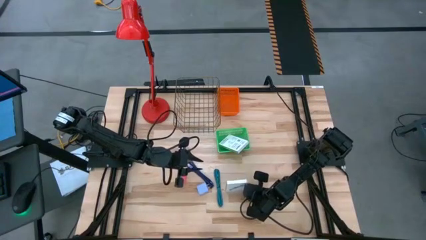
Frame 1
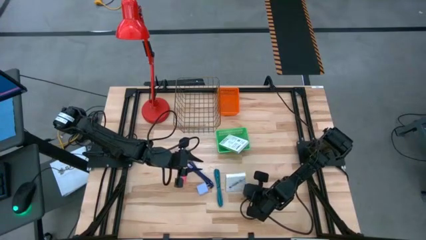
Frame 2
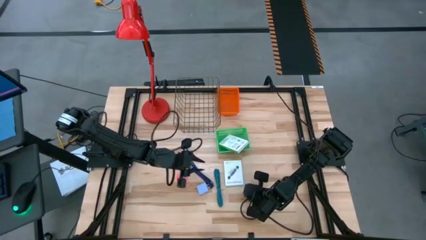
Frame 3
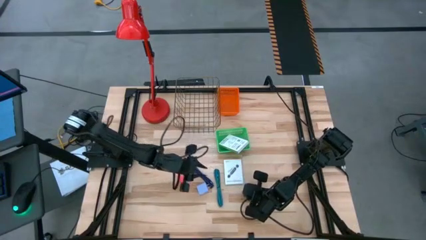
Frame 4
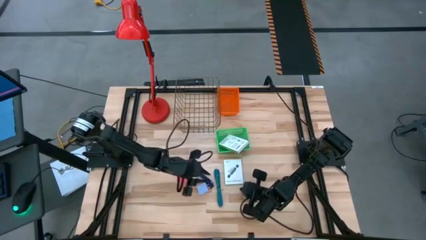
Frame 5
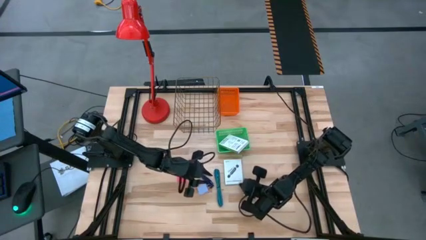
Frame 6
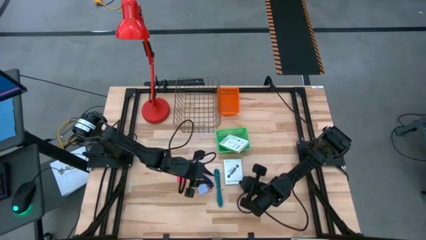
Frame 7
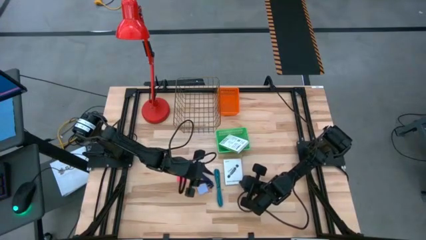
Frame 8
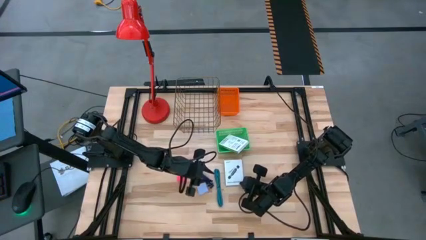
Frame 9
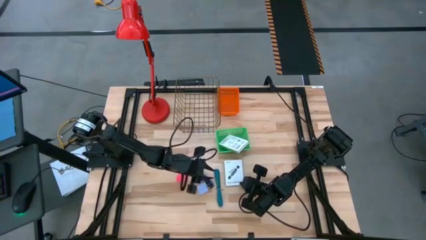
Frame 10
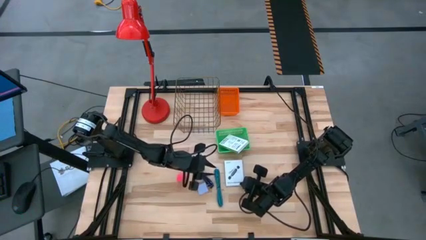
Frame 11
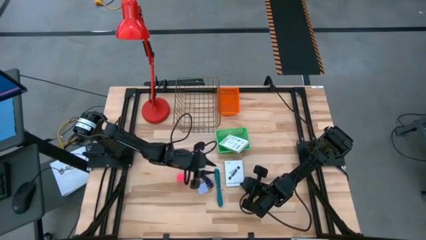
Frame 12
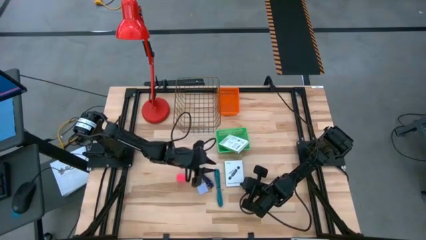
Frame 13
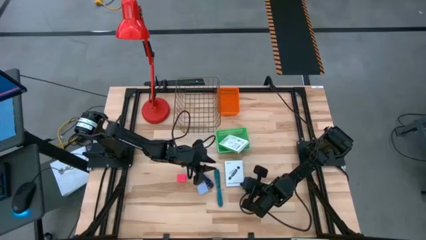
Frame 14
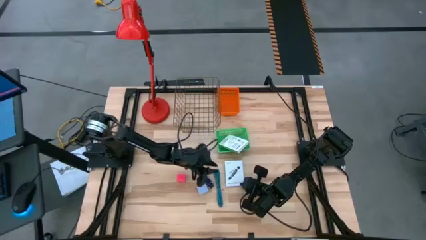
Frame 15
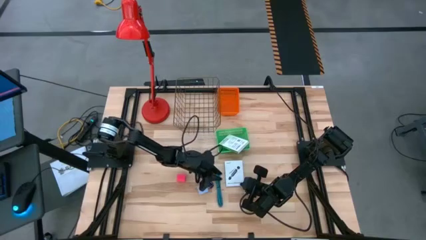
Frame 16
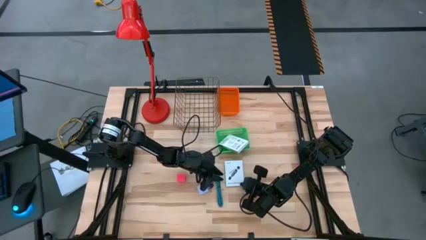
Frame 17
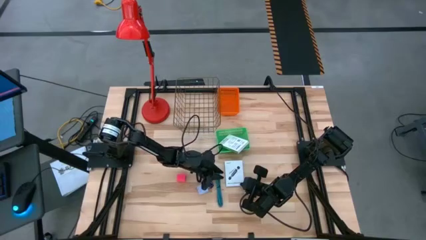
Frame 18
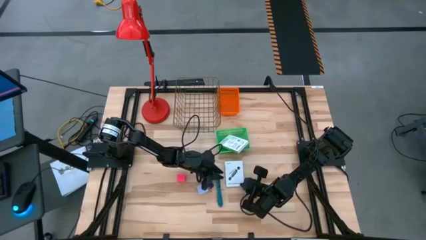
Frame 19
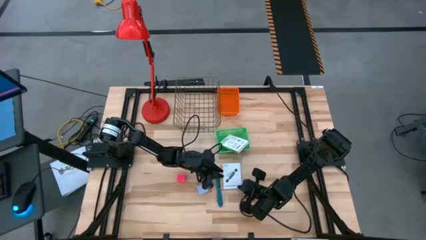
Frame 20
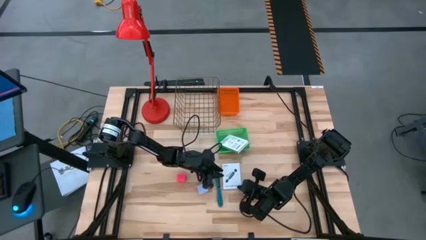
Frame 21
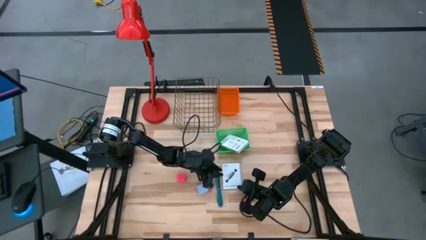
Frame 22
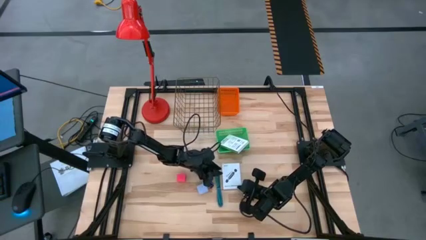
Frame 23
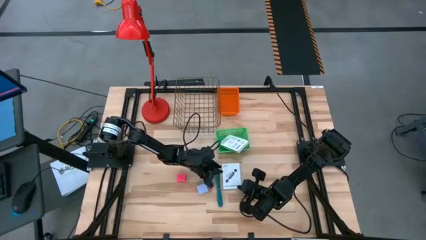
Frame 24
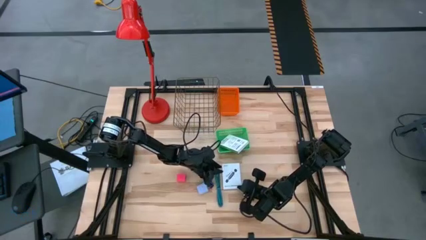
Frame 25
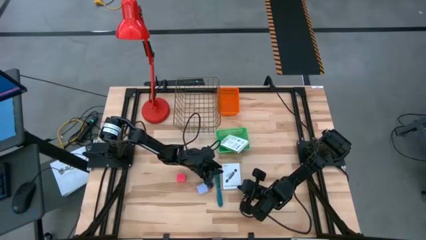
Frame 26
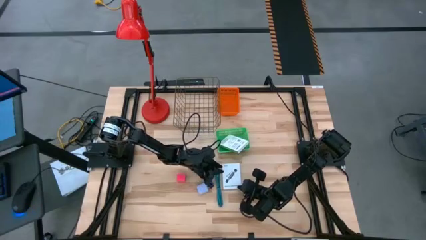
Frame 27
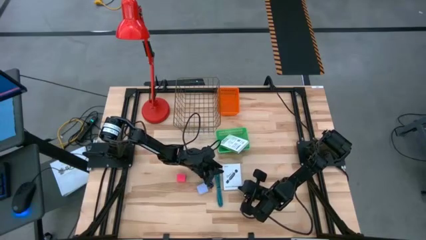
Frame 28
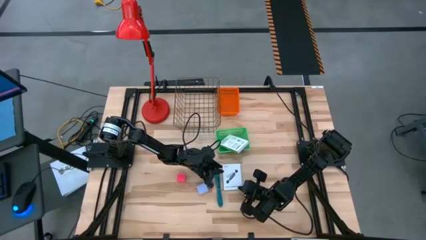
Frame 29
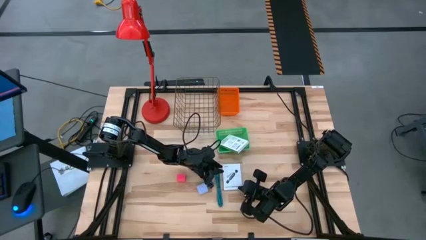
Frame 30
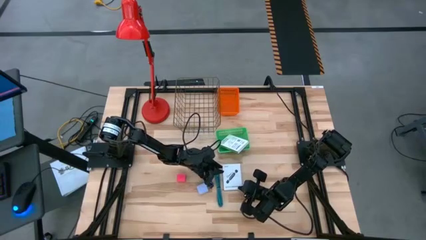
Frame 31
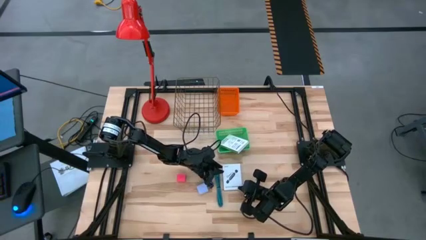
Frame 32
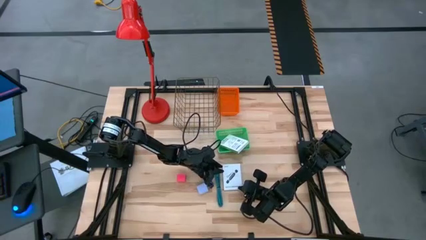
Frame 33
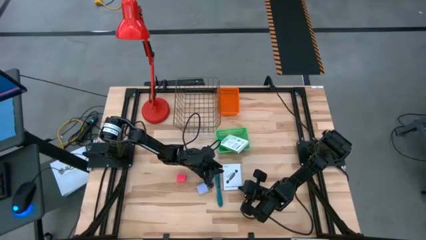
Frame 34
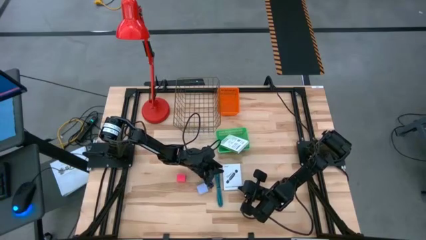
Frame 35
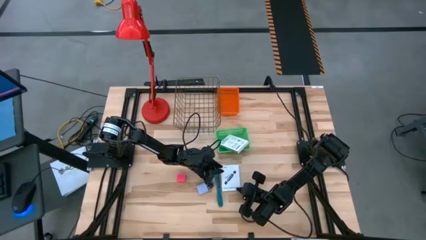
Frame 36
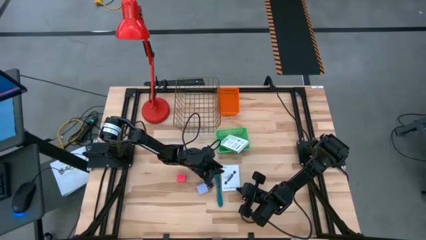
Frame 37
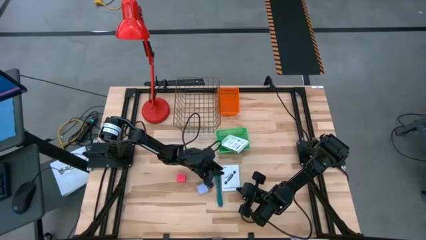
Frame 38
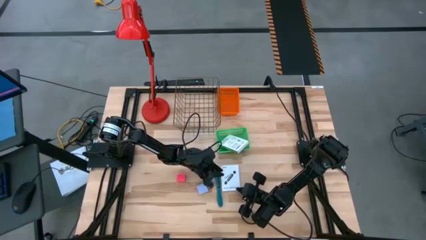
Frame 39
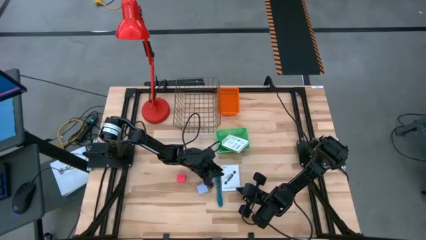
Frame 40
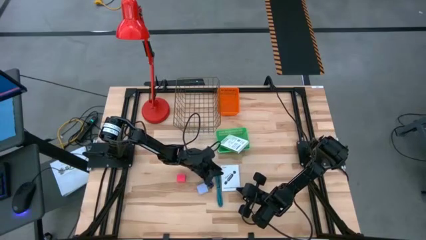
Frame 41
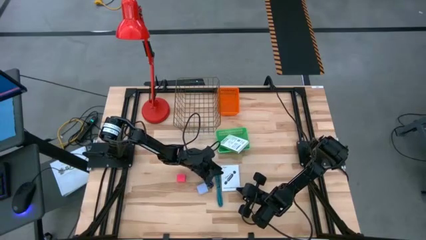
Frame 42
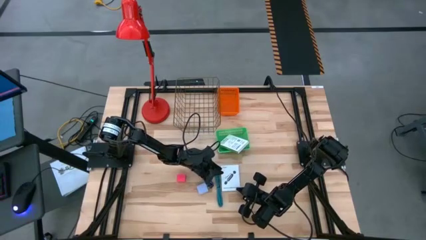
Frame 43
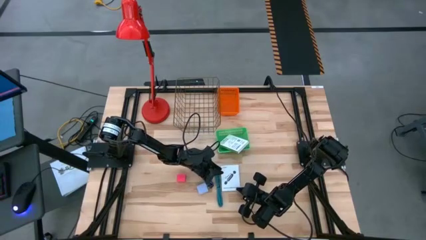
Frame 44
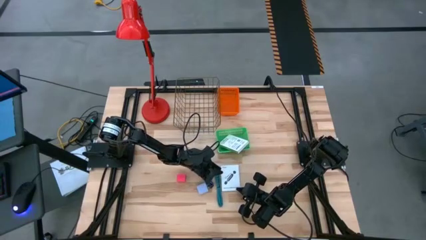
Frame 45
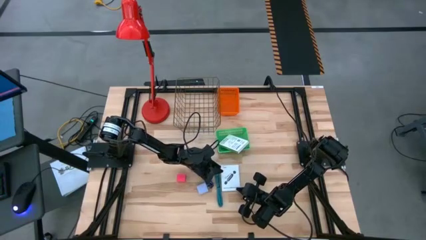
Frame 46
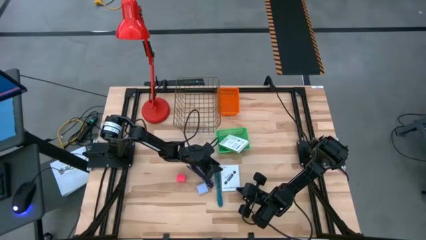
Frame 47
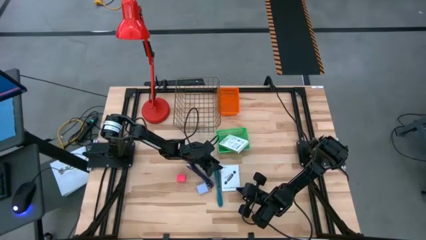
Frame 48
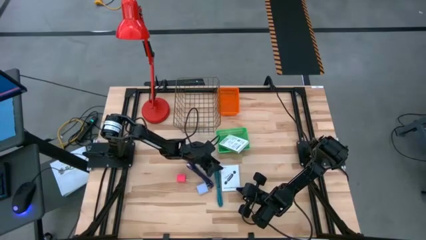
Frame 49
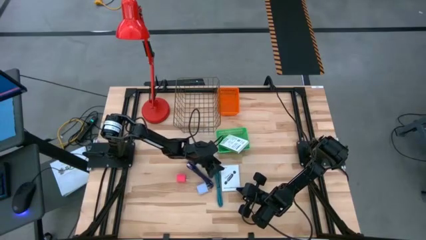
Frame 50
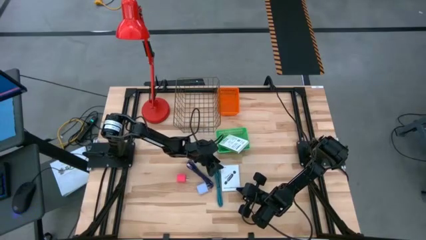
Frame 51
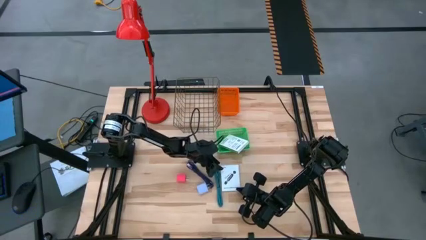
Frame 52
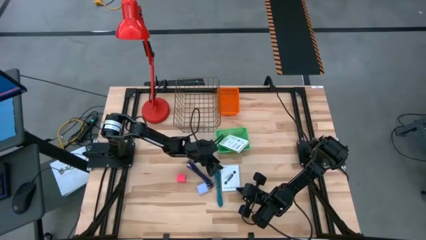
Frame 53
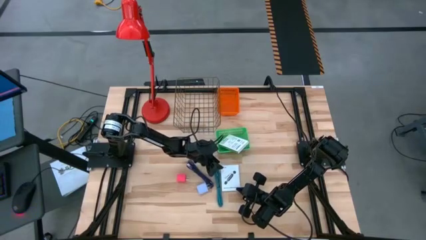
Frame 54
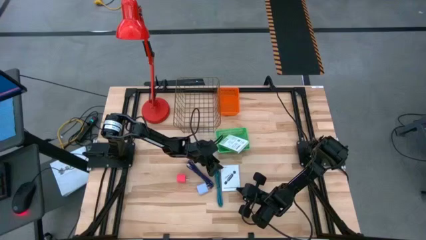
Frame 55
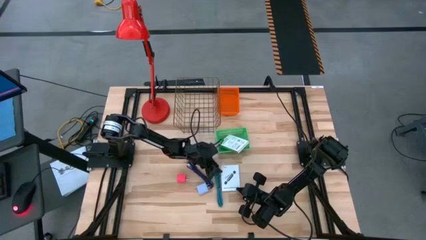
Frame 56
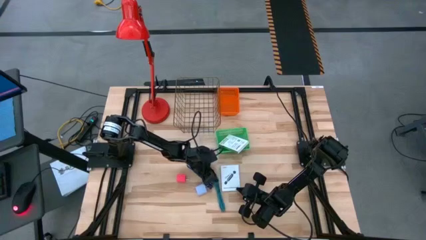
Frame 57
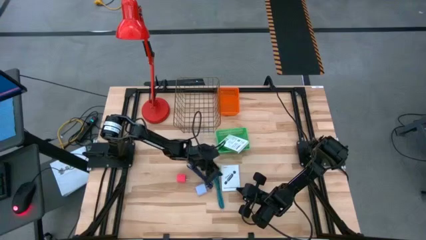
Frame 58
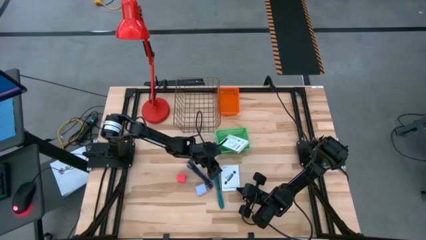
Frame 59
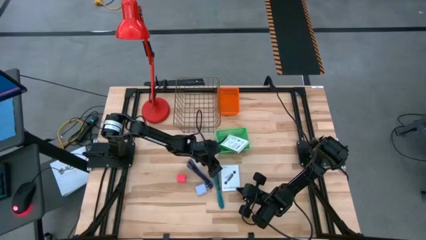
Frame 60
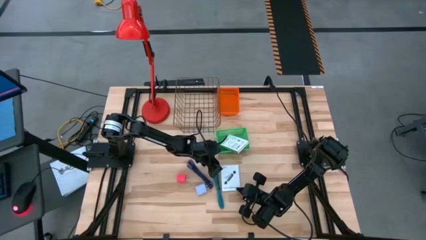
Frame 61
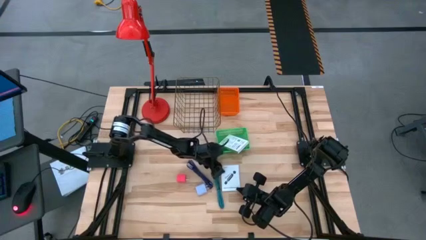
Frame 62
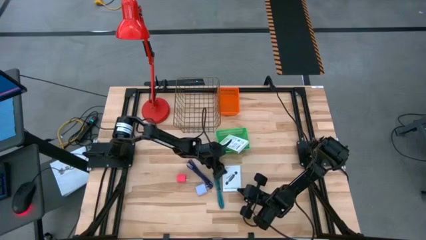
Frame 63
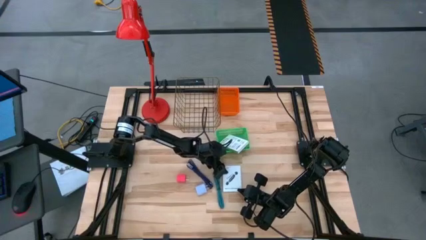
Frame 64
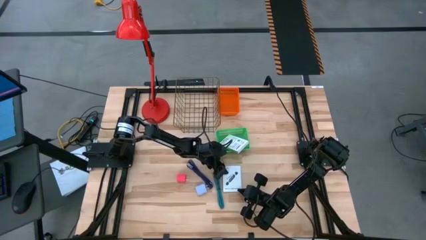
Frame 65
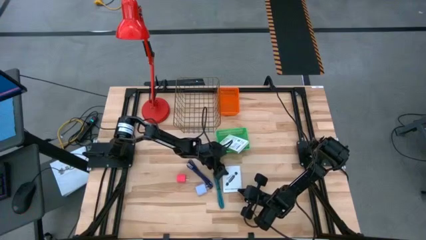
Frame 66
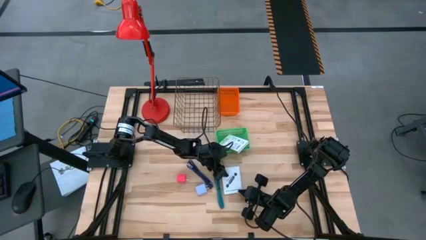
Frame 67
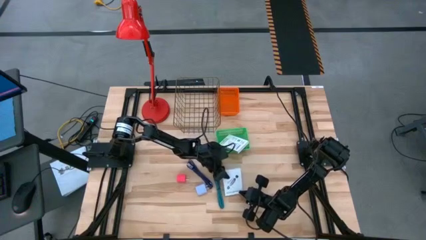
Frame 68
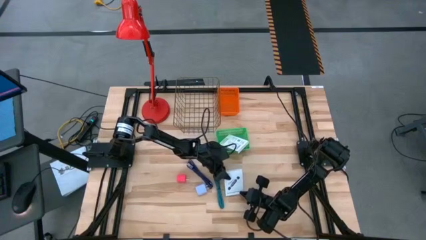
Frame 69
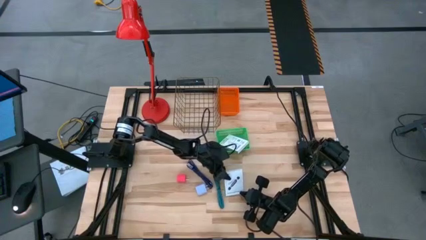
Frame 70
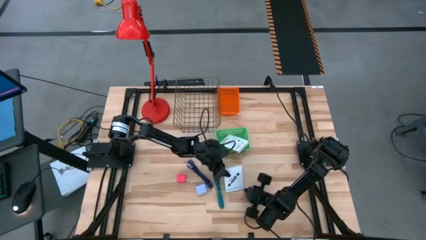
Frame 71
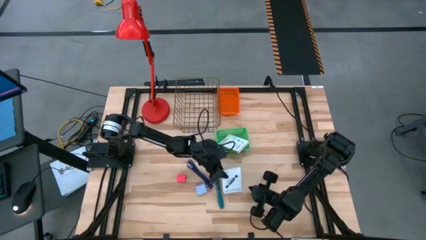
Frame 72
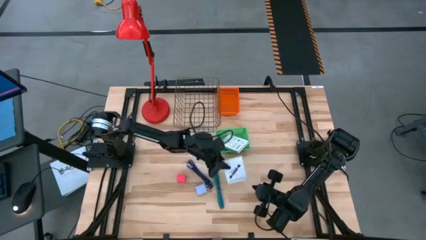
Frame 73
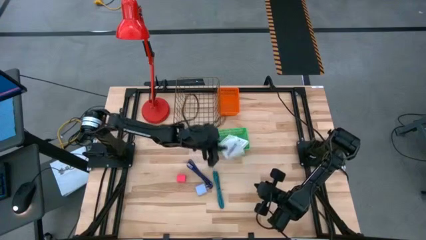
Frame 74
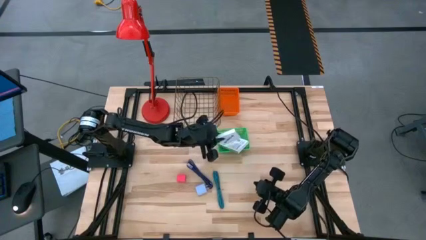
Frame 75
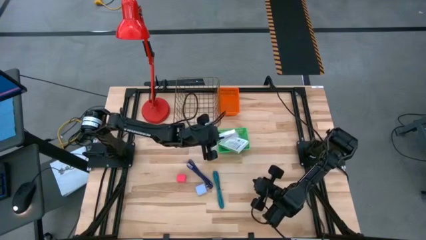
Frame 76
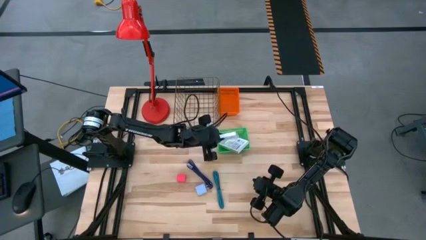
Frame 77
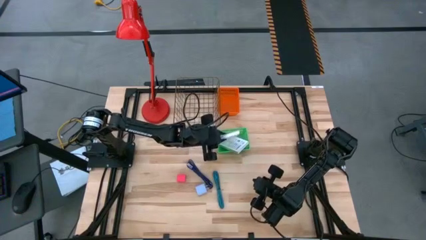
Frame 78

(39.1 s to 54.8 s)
Task: Pick and place items into bin
Put the card reader box into the green bin

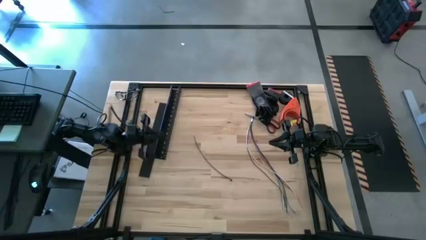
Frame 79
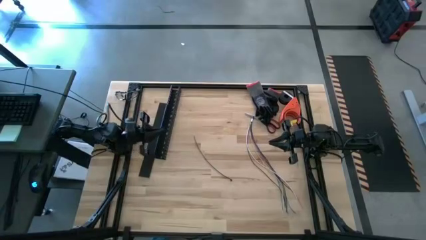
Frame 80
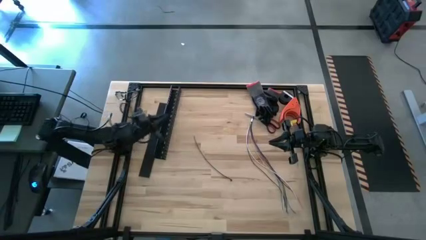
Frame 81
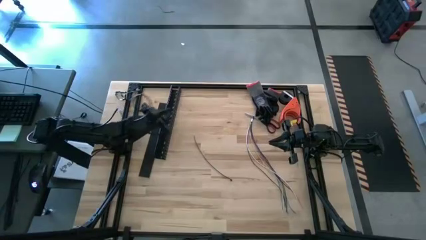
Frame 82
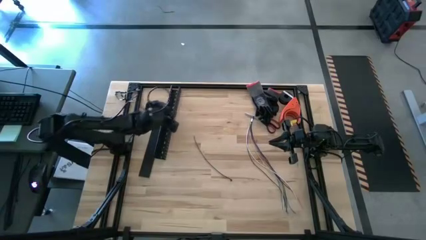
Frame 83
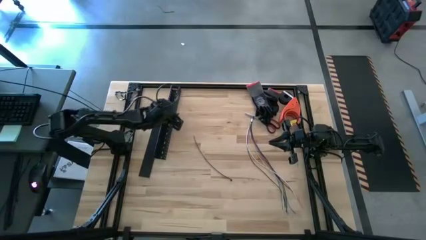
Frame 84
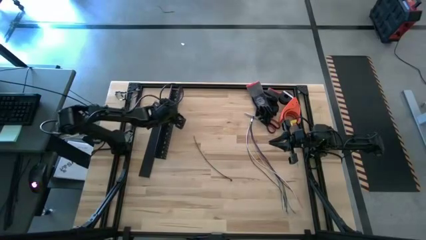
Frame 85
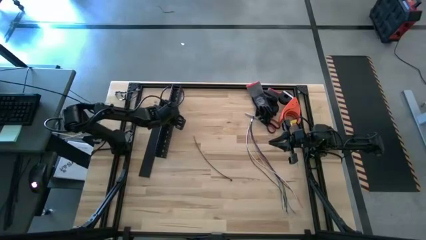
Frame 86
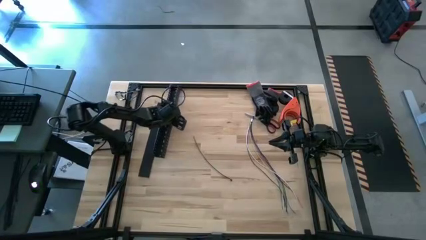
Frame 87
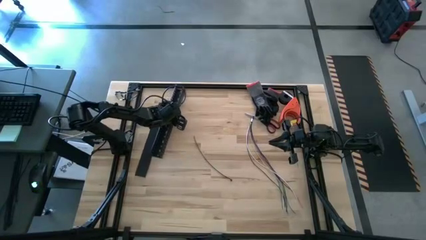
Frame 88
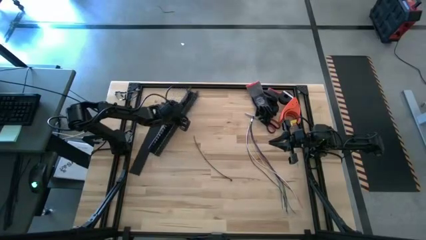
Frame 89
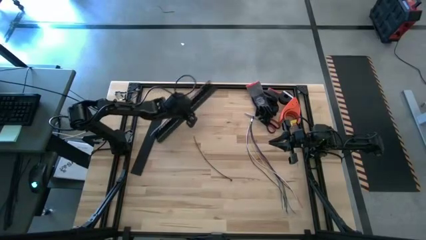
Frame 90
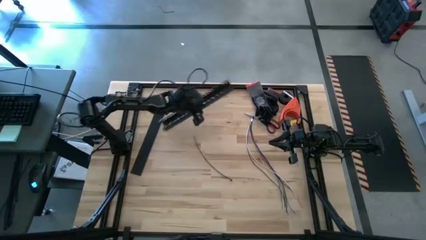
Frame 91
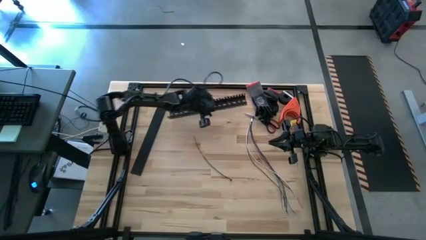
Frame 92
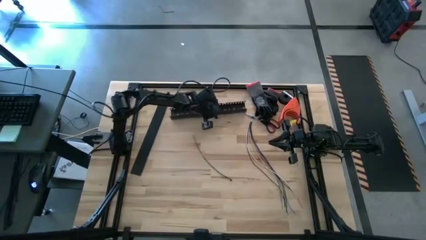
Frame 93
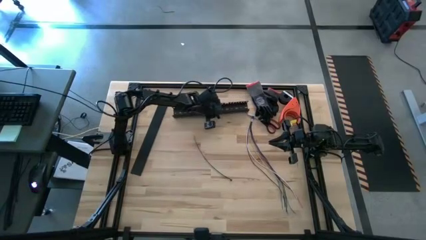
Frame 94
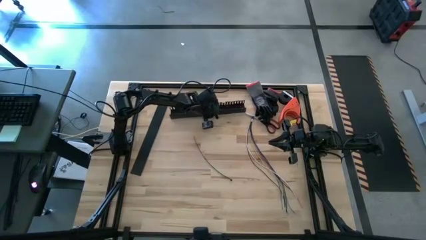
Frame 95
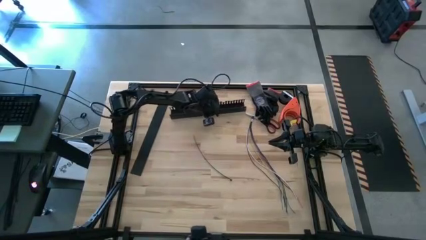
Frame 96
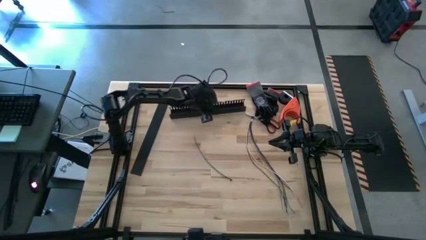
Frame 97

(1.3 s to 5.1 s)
Task: Ziptie cables
Move the black cable duct to the top center of the table
